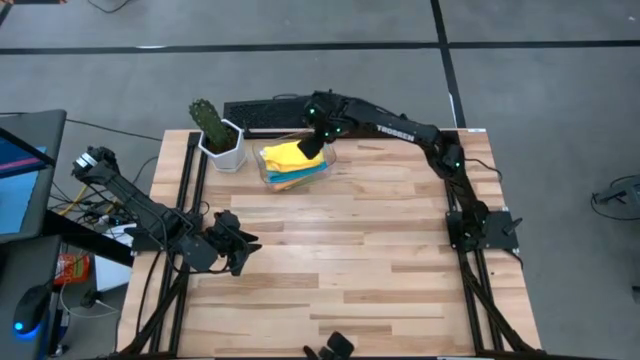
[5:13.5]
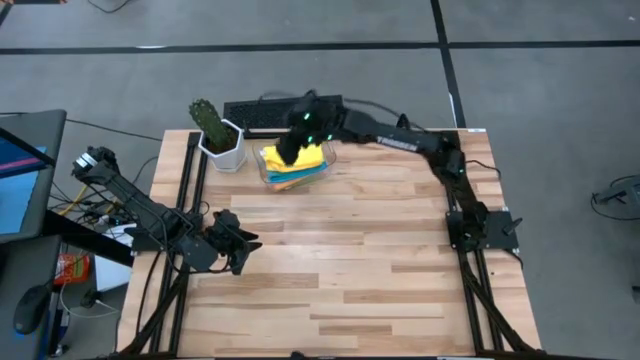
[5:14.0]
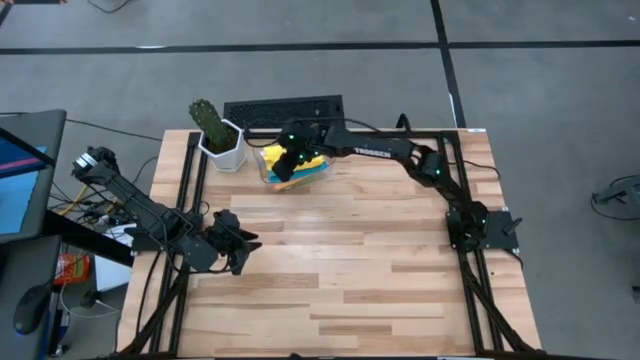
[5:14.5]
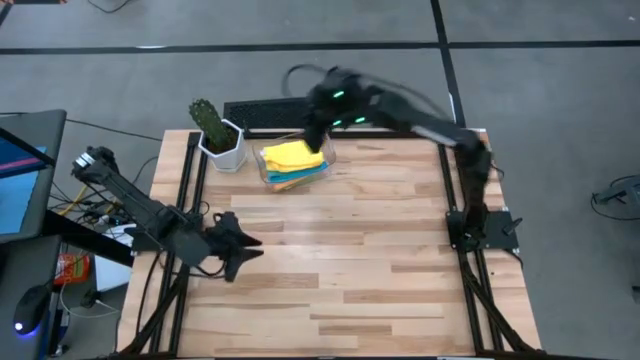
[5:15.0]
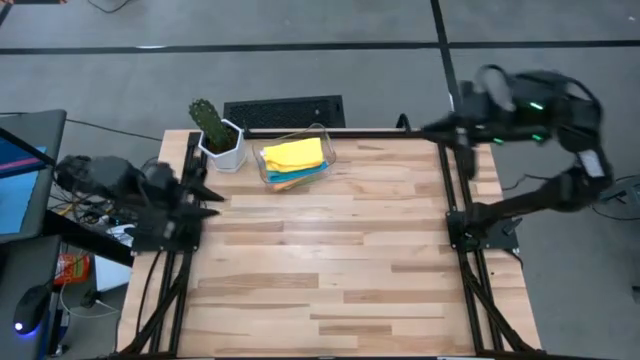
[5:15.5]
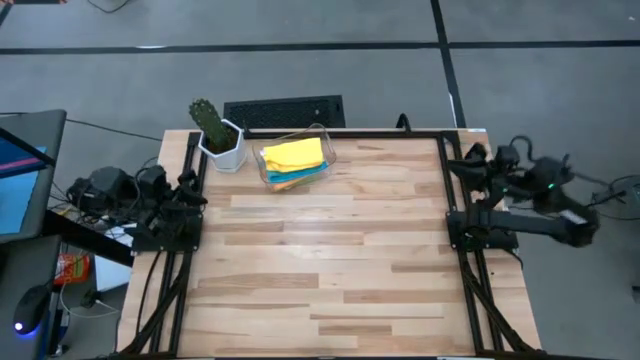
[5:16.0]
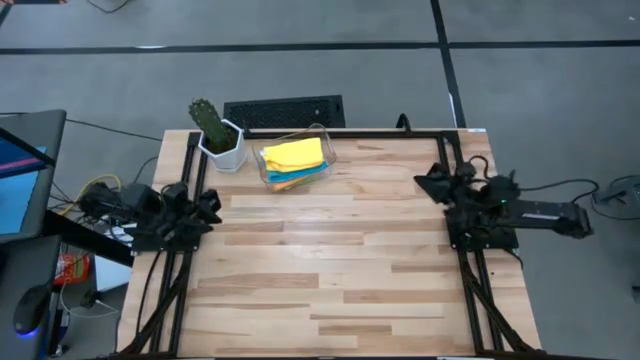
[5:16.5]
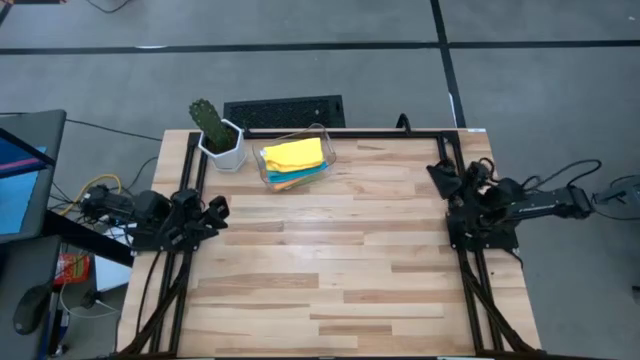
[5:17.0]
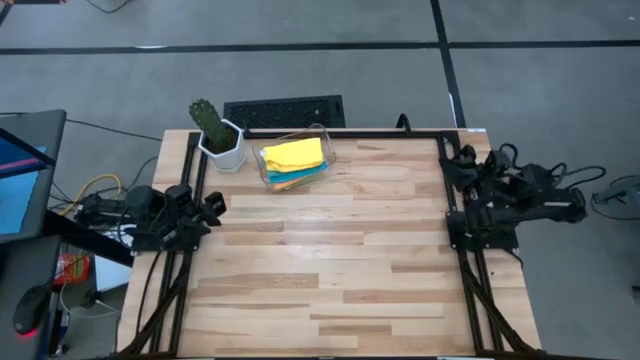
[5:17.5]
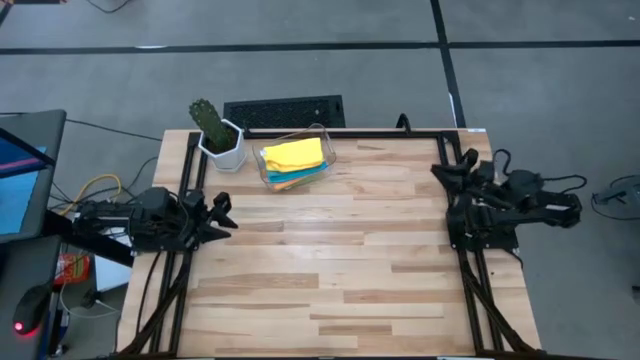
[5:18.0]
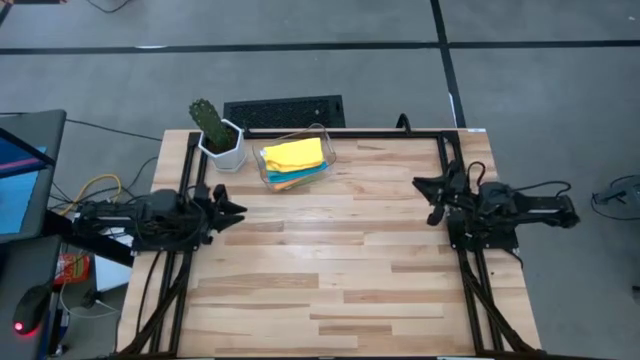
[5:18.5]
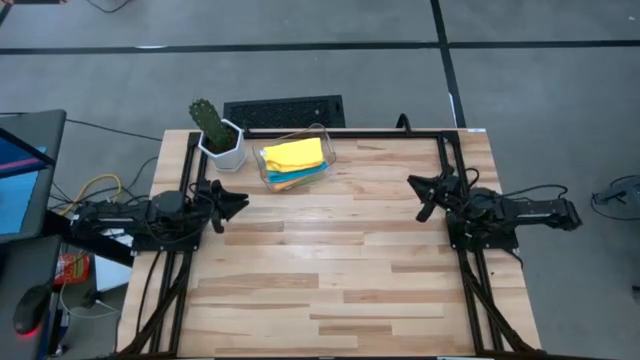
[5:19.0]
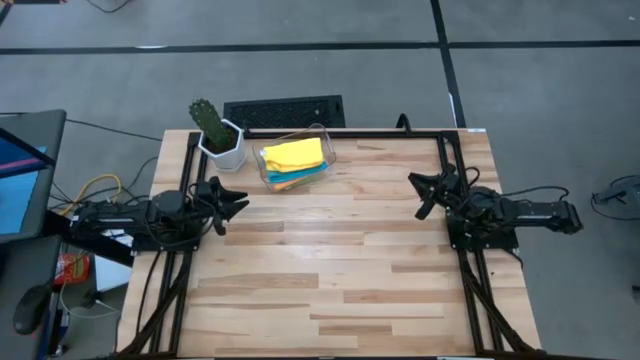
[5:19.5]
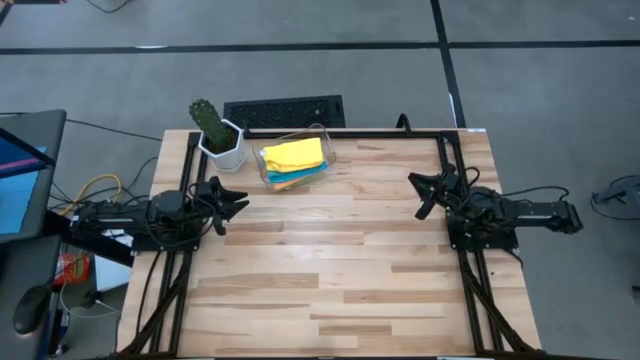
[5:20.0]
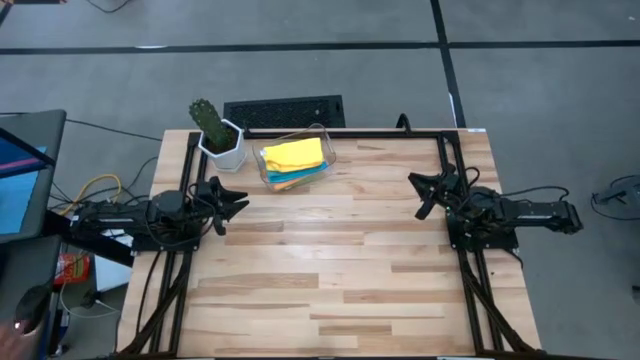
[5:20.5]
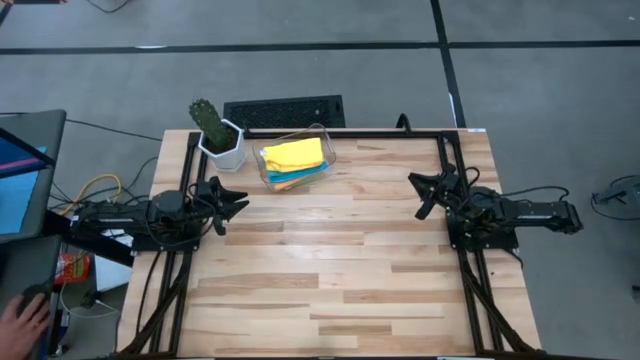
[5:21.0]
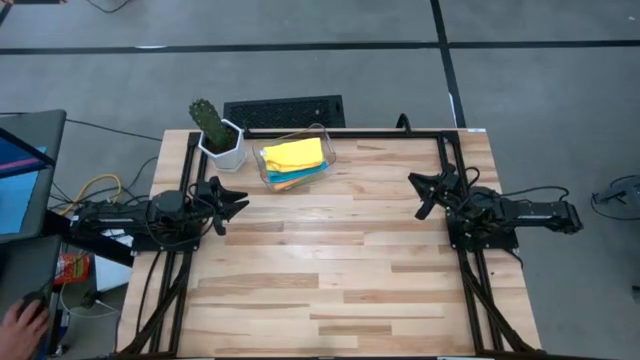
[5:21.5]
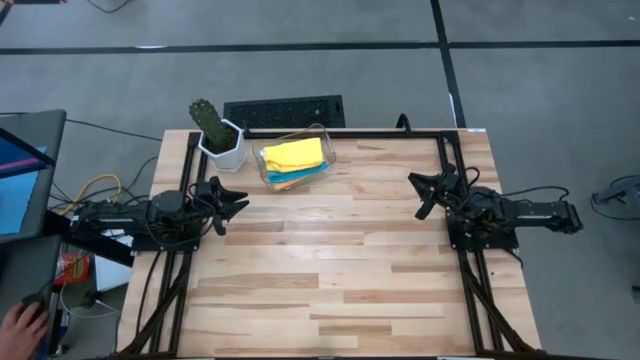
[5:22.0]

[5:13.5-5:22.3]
Task: Fold microfiber towels
Return to Home Position

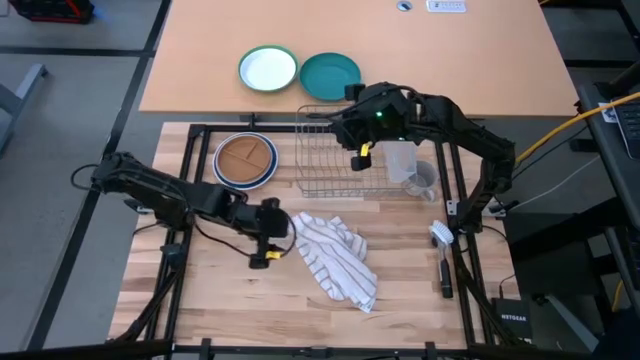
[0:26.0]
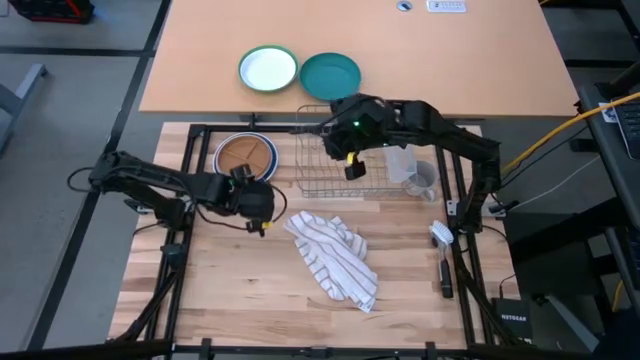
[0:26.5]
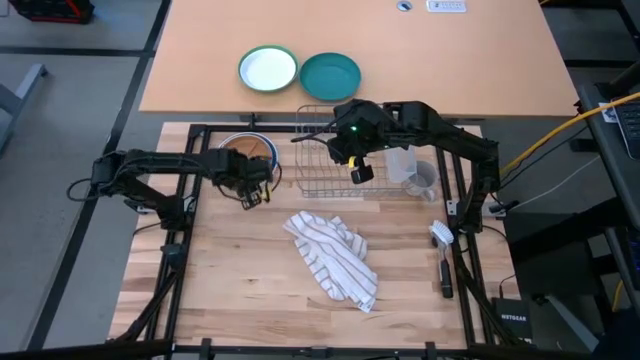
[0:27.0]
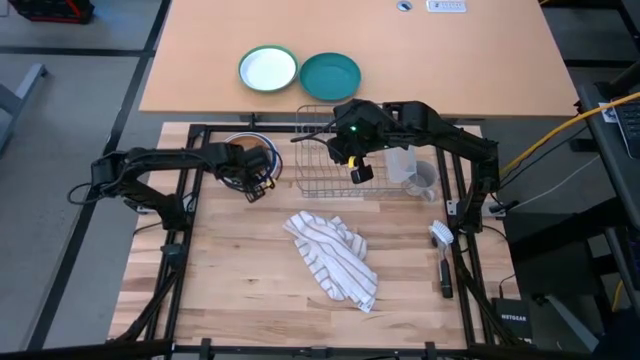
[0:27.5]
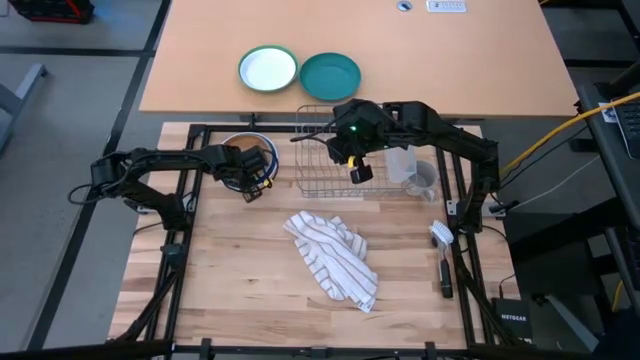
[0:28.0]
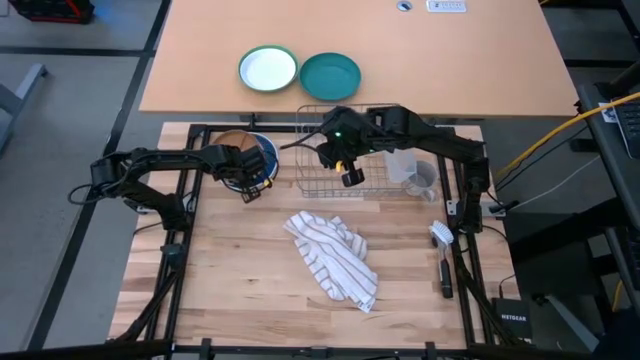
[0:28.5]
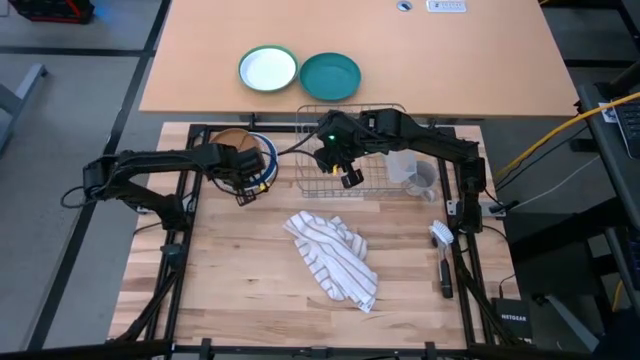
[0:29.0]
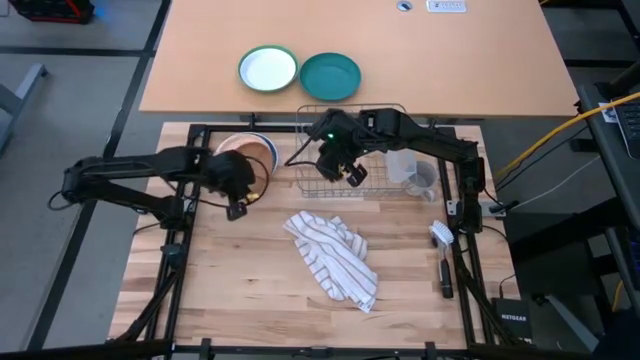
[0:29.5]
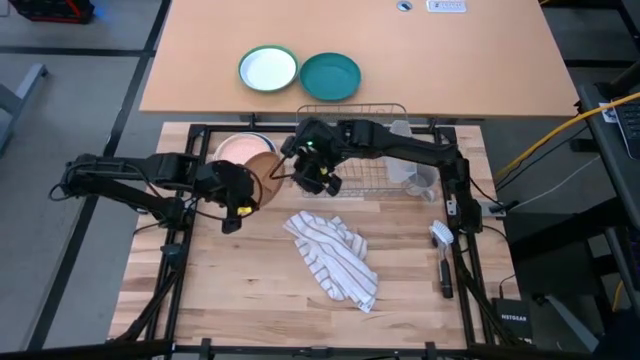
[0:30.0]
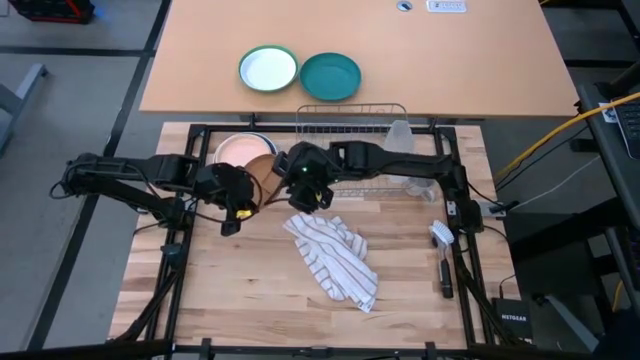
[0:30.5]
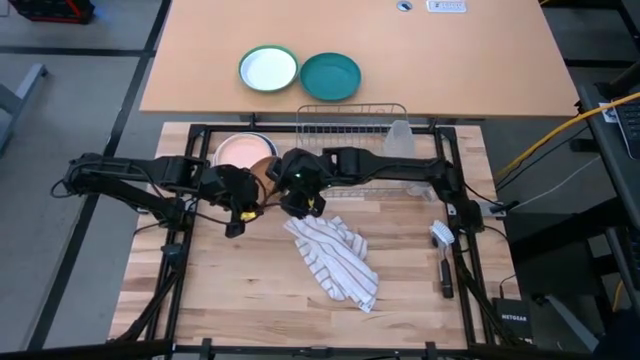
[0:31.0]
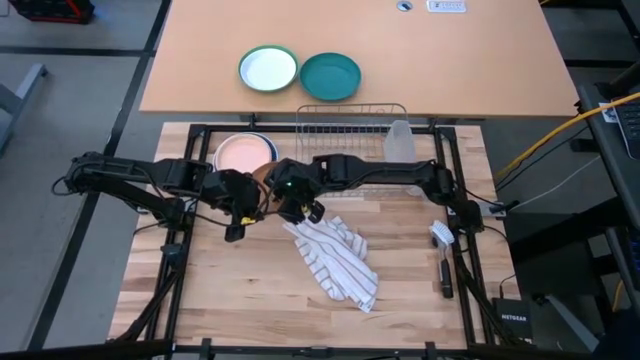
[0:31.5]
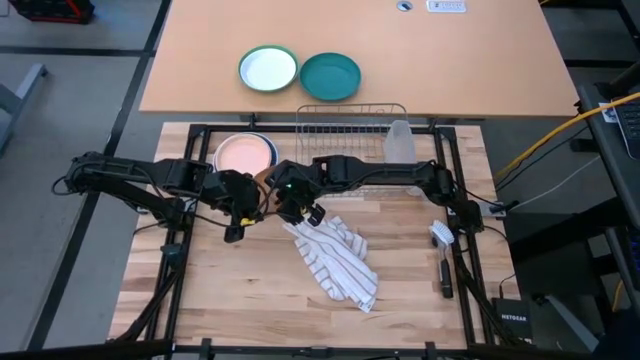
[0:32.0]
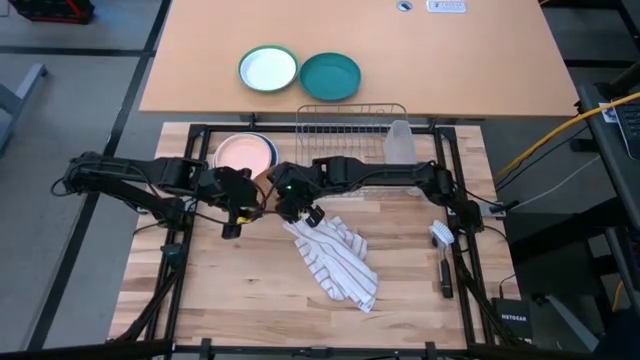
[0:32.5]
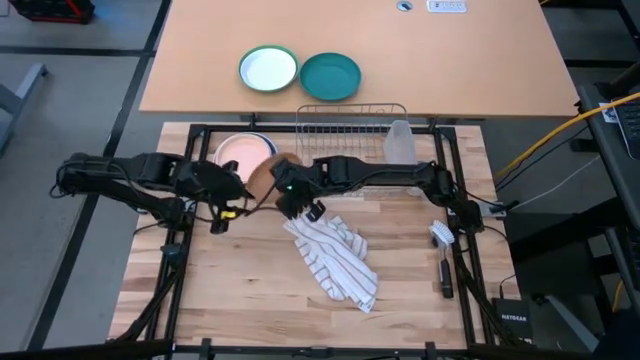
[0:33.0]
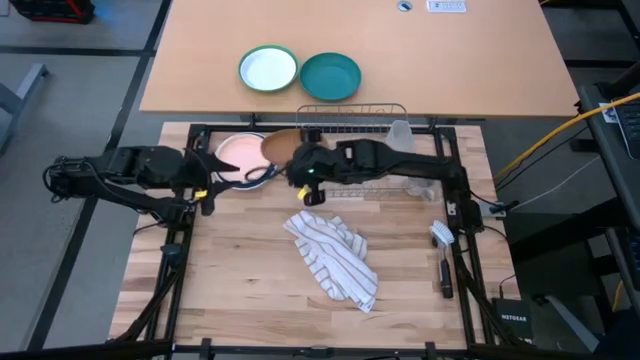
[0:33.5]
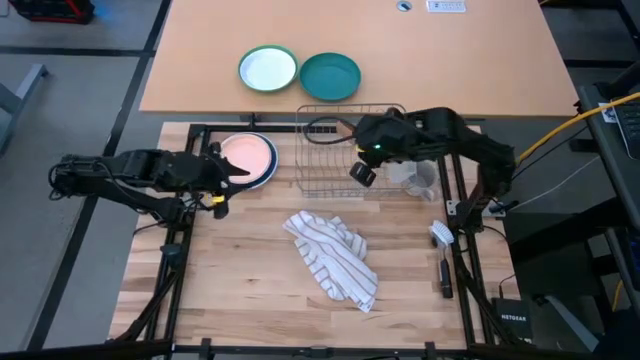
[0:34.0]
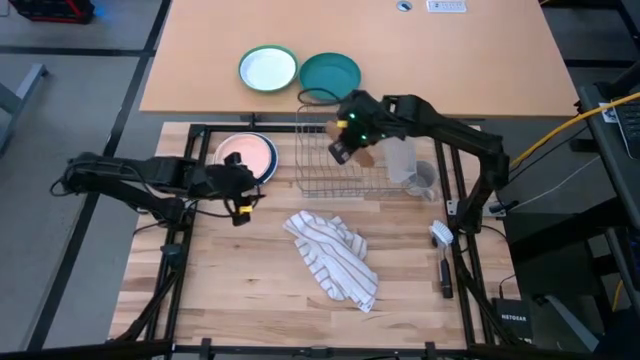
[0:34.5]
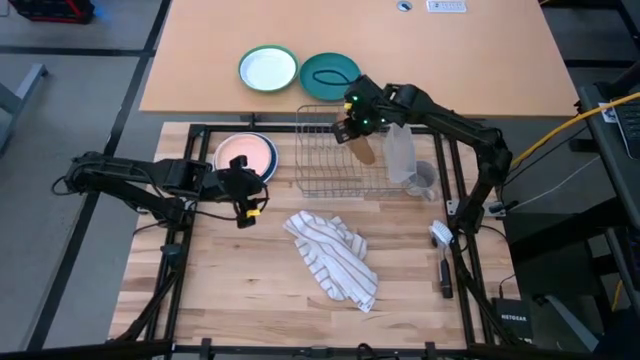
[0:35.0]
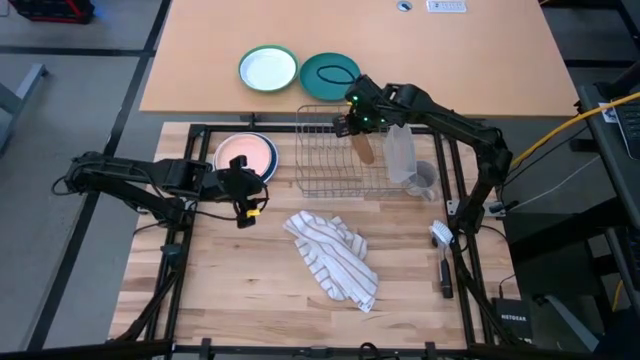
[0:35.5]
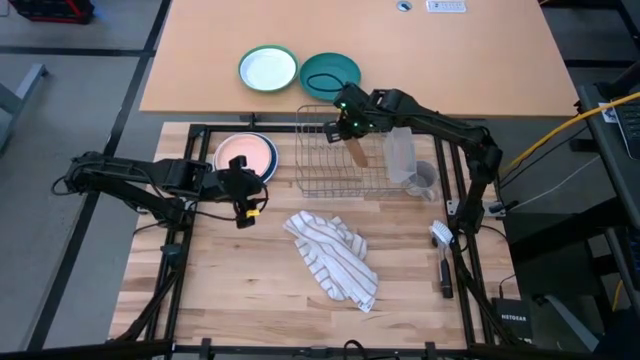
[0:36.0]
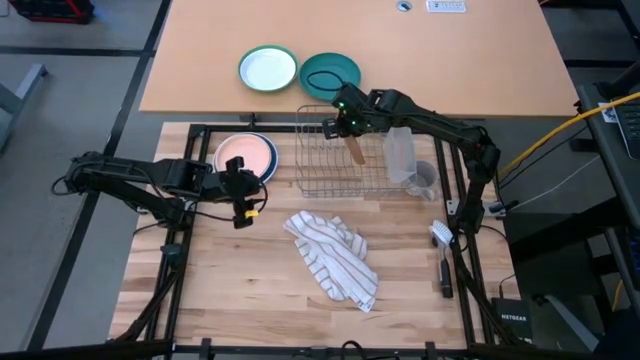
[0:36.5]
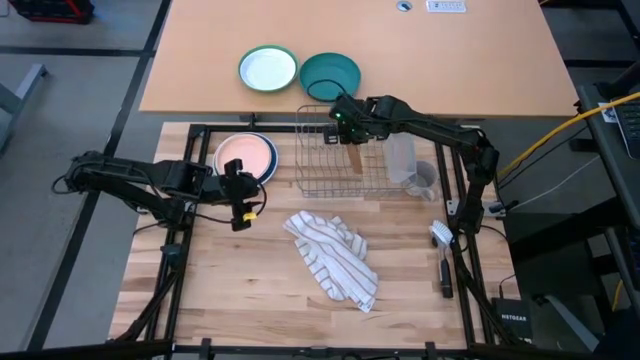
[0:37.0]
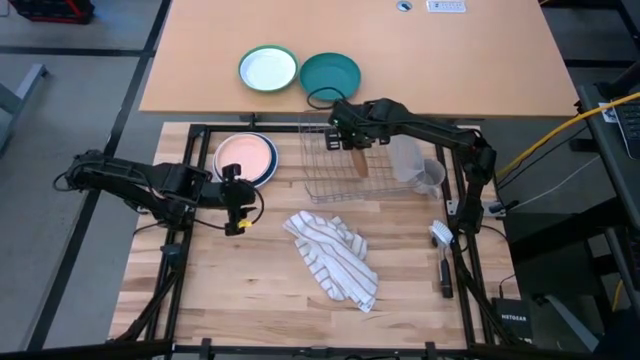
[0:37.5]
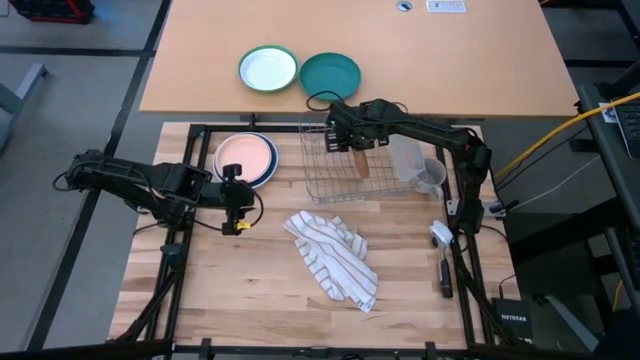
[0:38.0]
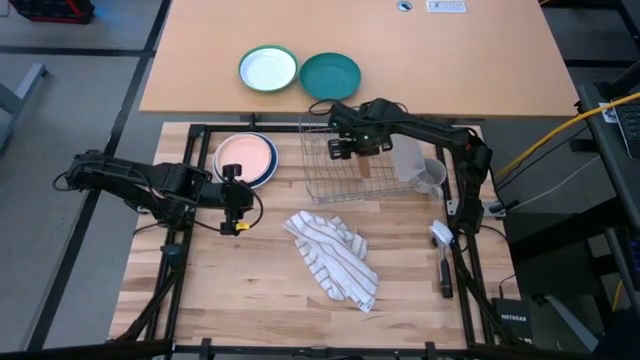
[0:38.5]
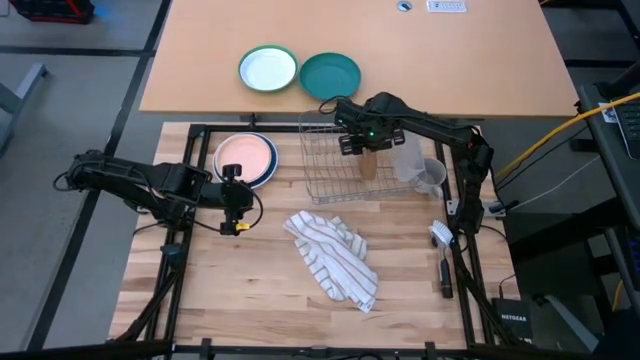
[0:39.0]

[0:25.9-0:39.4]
Task: Sort dishes
Put the brown plate into the dish rack
